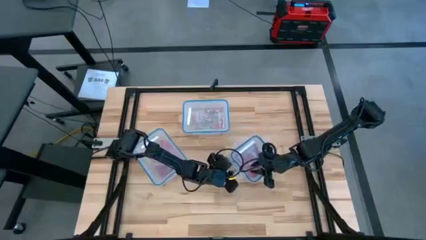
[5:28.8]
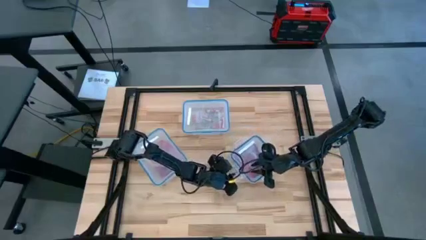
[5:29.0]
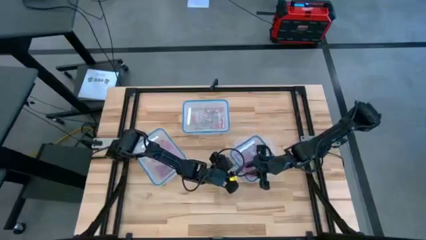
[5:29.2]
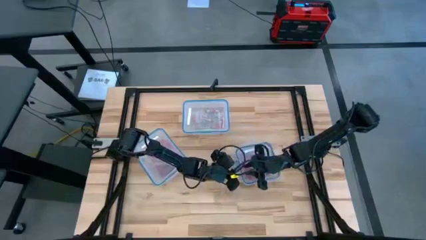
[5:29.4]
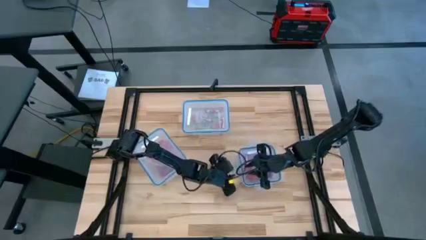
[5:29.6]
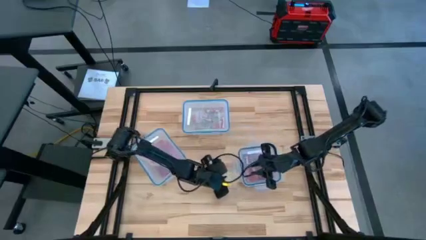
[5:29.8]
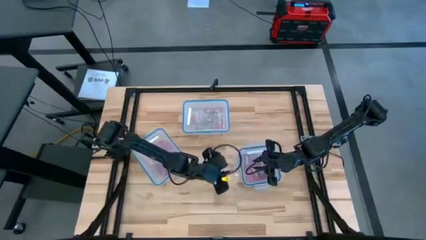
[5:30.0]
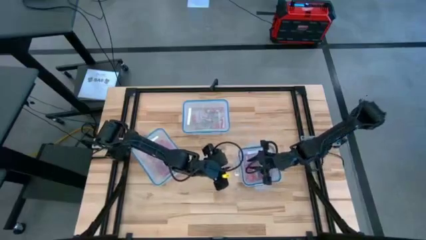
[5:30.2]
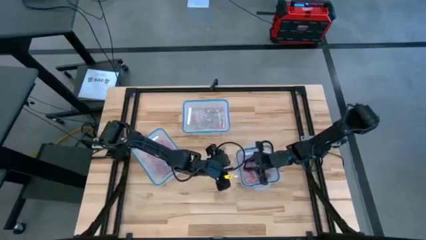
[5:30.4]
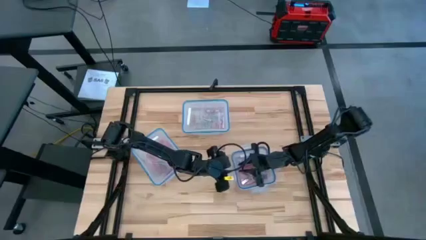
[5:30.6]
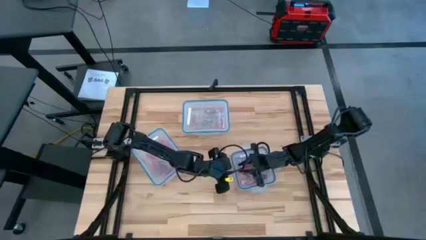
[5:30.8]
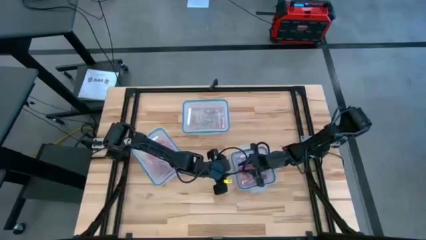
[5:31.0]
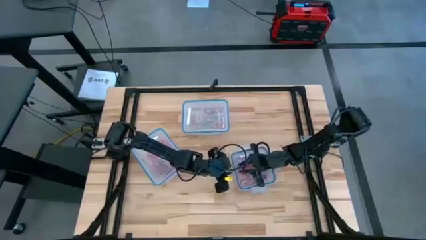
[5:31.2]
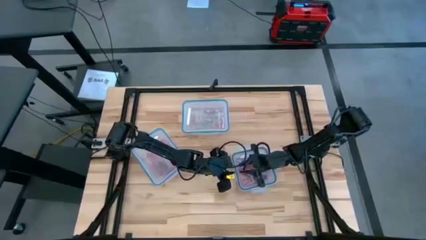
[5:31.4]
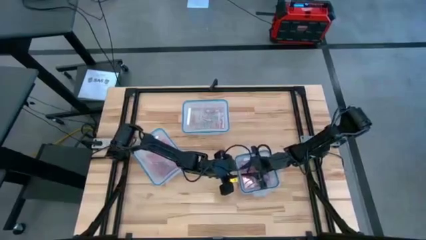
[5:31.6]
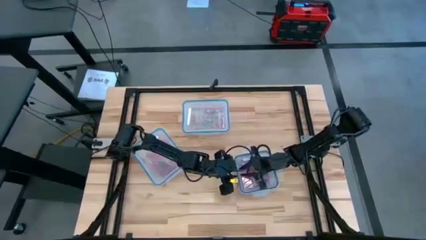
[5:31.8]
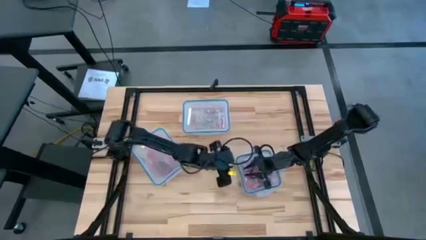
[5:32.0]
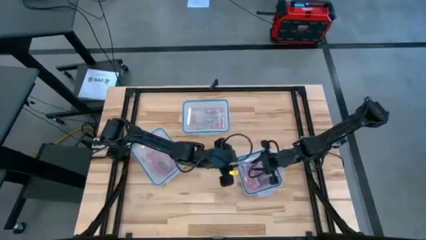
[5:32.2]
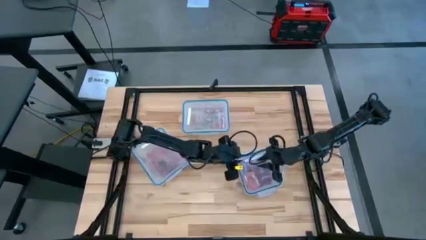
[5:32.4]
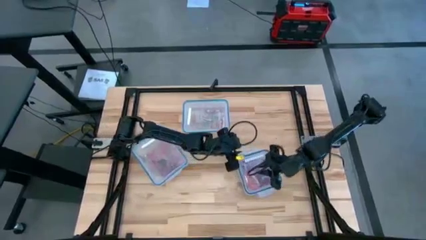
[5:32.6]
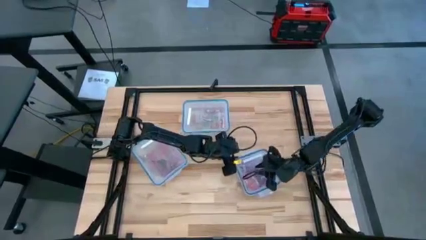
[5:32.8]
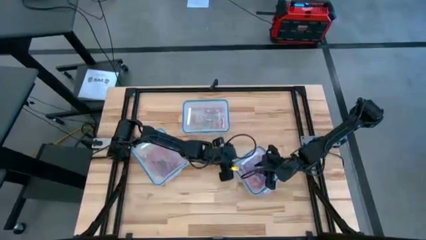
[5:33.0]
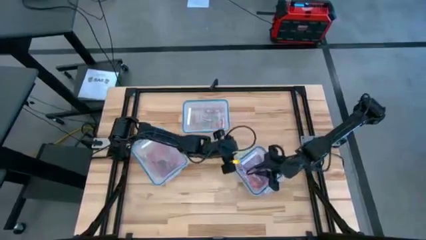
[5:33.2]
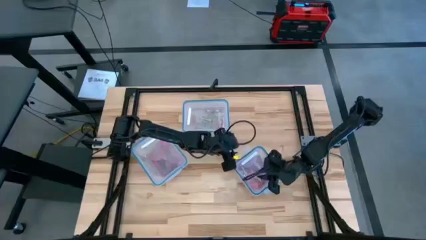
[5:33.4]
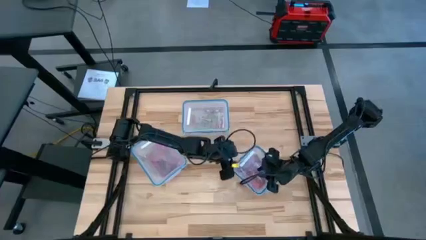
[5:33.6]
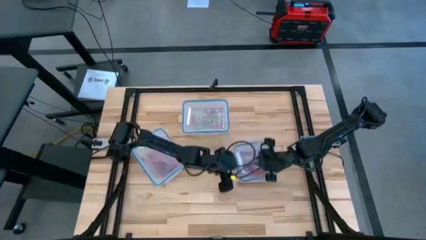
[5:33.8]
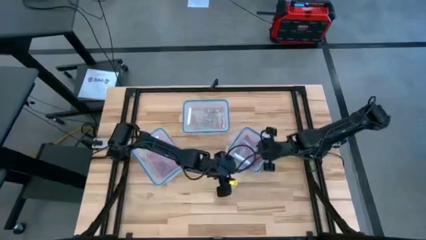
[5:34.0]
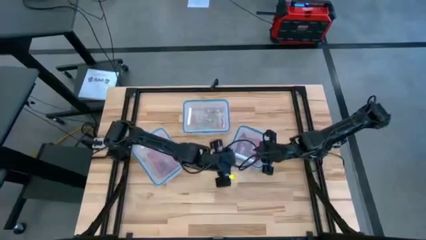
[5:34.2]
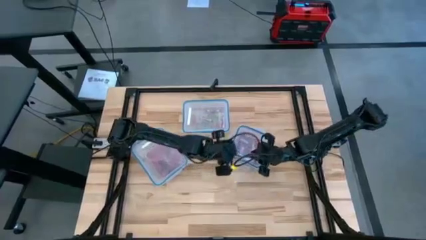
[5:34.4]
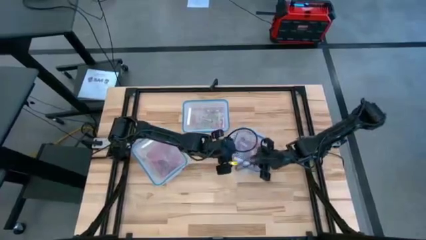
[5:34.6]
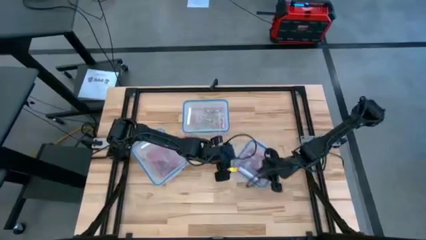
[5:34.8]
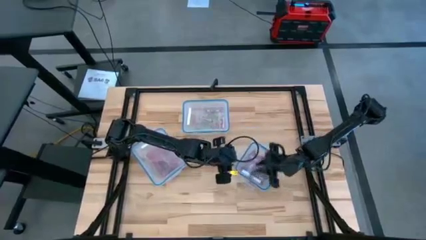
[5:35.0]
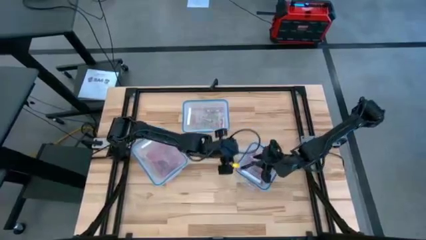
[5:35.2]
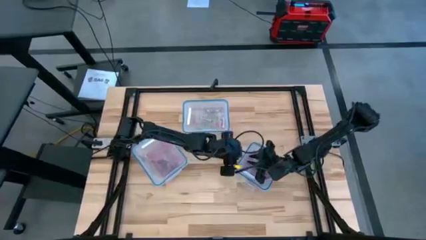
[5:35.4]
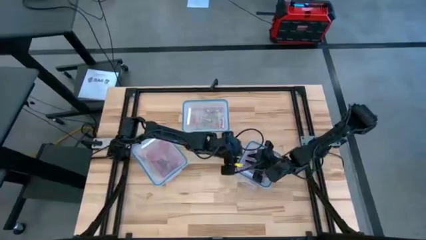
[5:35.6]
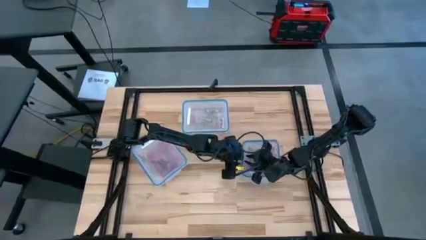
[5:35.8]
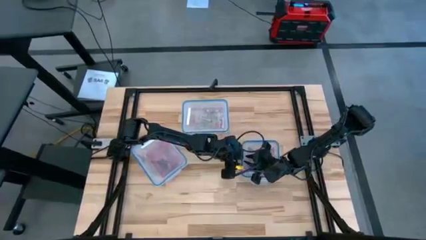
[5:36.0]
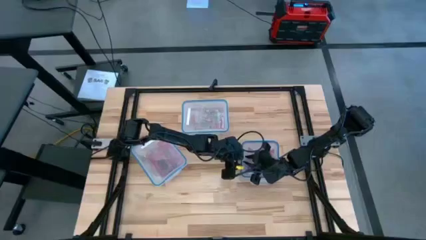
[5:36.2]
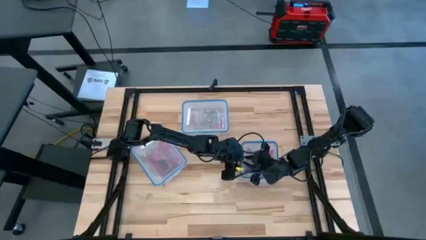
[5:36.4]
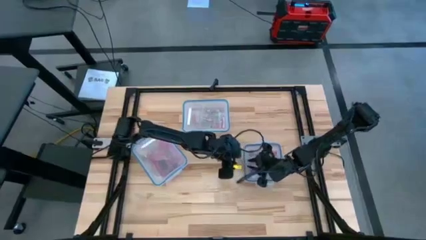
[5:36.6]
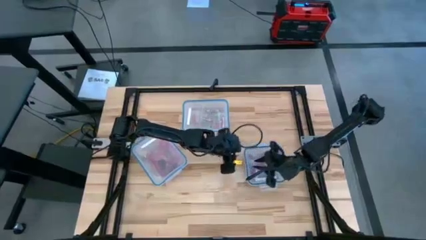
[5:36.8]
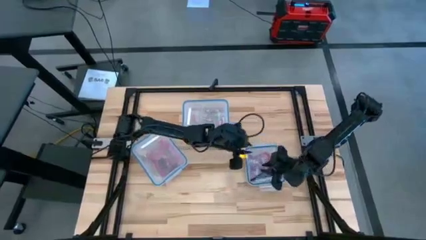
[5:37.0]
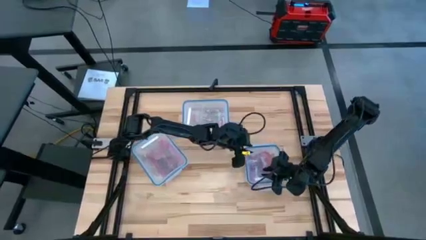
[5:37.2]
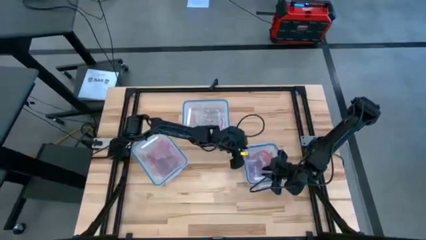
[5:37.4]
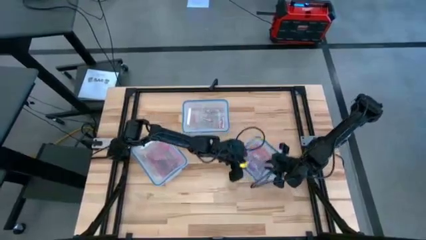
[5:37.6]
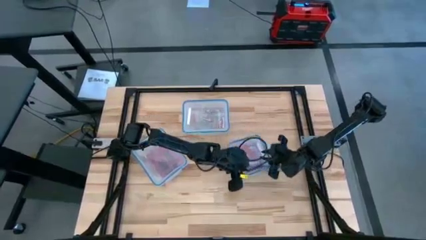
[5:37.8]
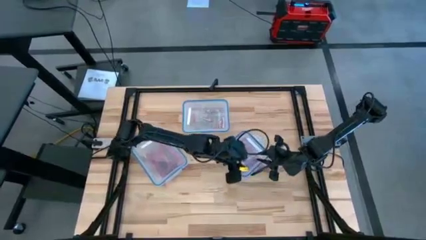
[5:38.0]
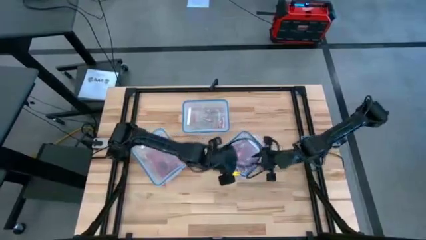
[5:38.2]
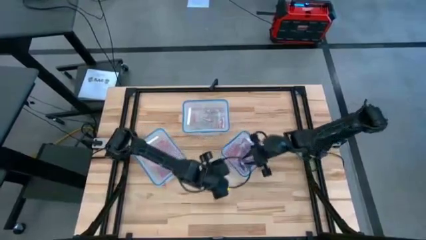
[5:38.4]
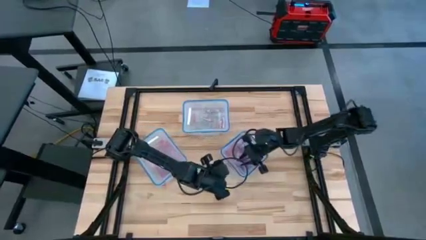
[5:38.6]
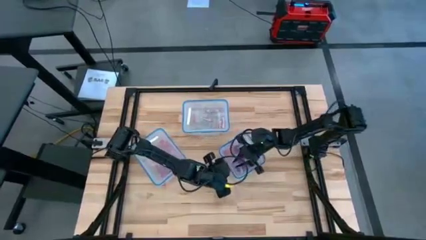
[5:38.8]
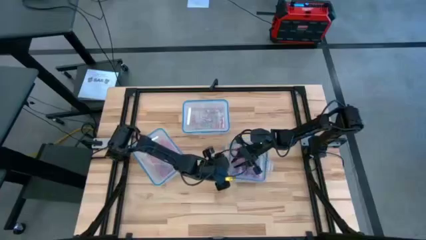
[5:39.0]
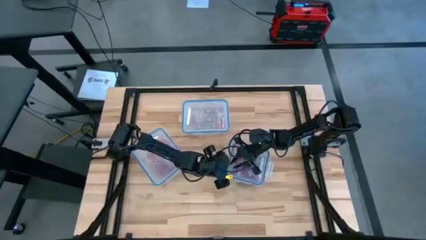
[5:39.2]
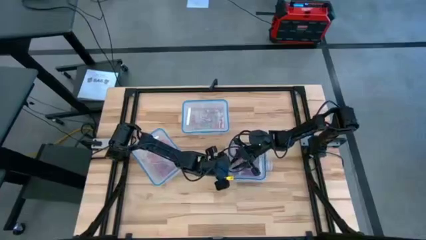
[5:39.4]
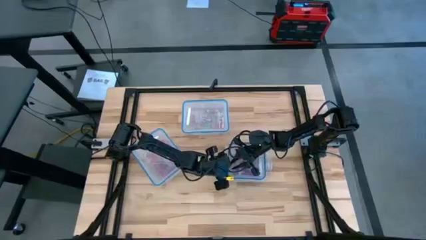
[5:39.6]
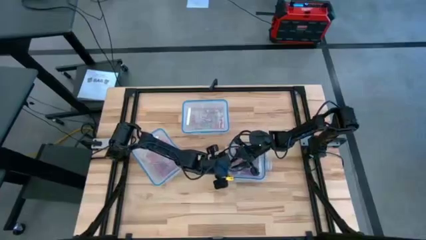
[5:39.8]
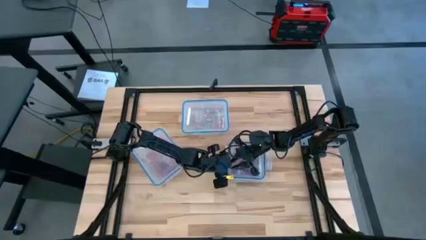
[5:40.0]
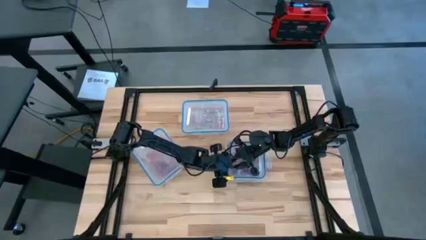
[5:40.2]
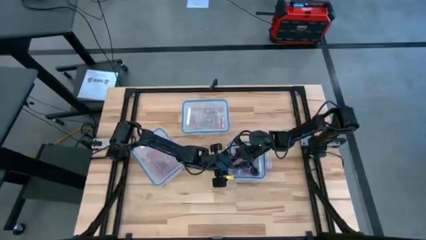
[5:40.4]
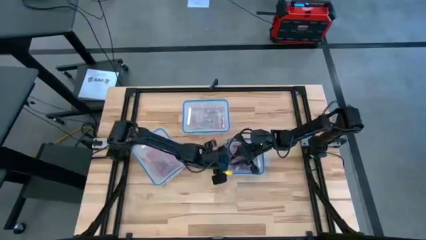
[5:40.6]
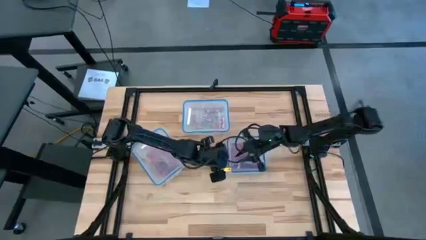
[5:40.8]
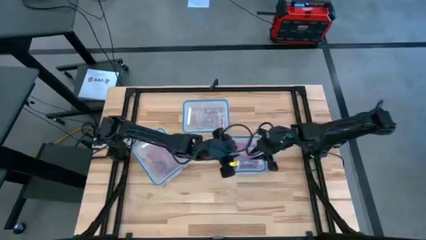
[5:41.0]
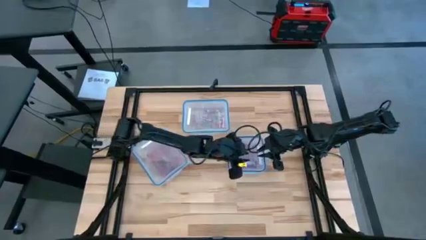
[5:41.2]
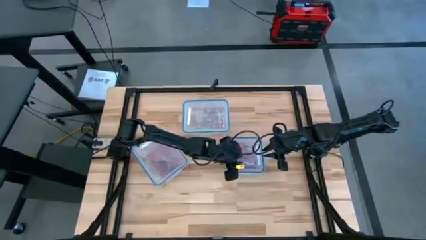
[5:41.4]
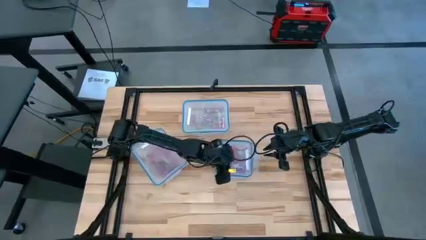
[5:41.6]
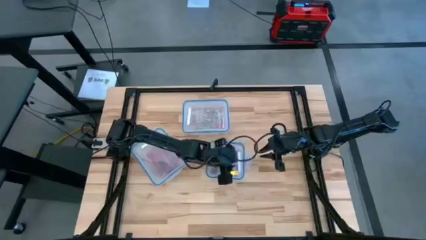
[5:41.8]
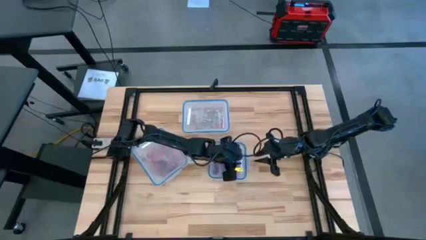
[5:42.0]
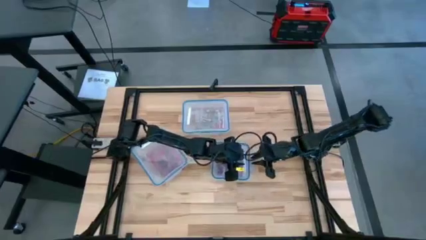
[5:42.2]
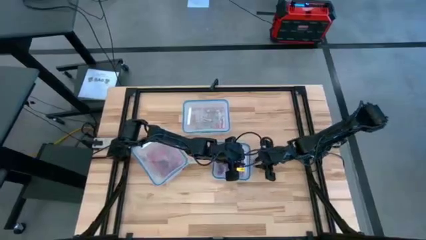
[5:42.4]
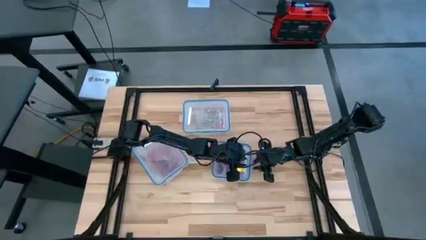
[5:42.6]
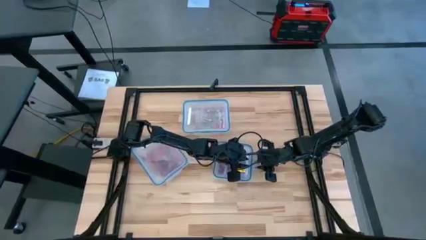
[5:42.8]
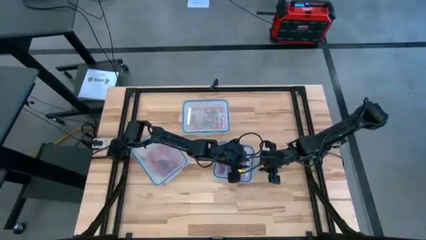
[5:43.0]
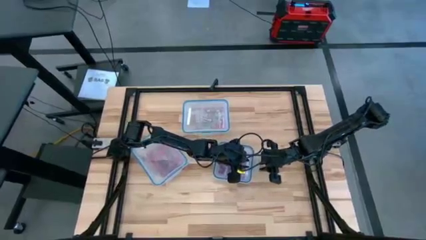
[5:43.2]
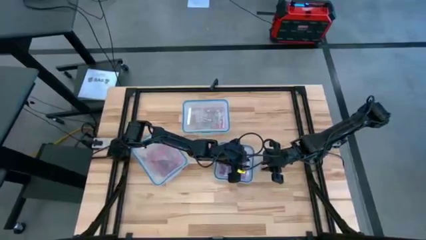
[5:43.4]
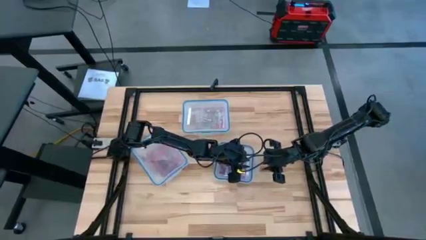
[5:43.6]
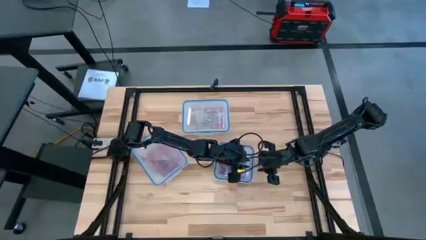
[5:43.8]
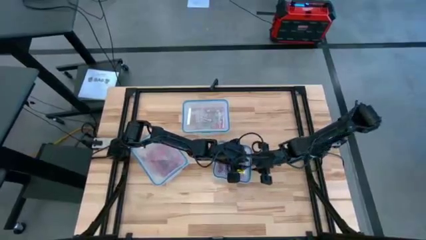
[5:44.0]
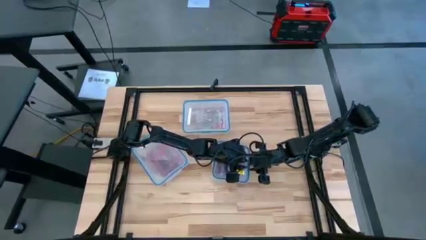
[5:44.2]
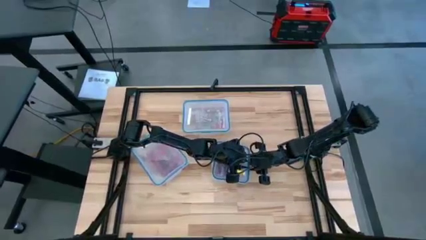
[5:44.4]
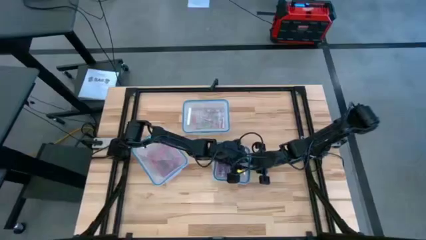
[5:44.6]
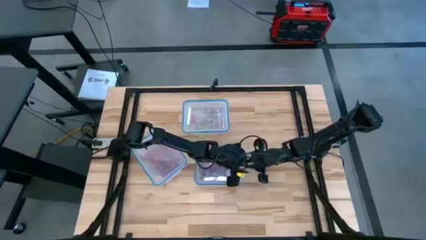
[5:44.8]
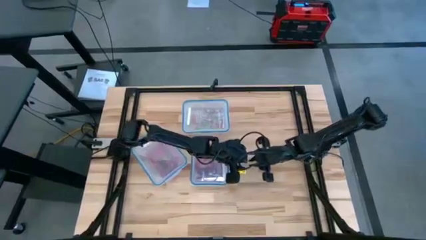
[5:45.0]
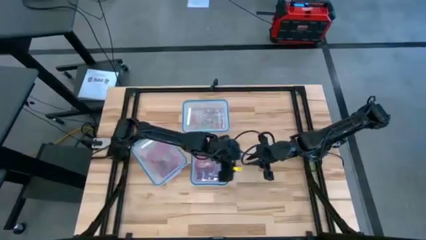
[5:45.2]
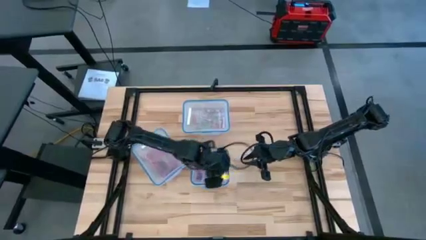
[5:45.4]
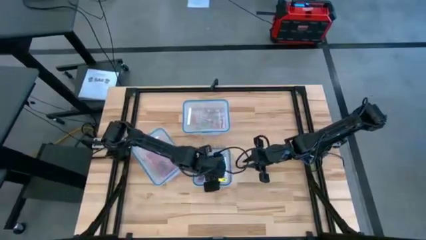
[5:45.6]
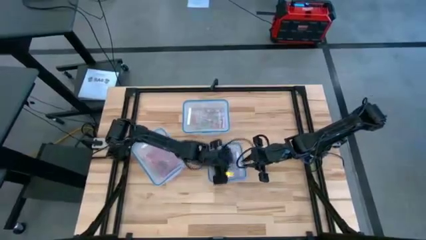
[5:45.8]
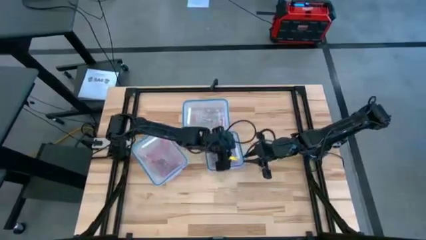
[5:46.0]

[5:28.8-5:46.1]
Task: Sort candy
Close the middle right transparent bin
